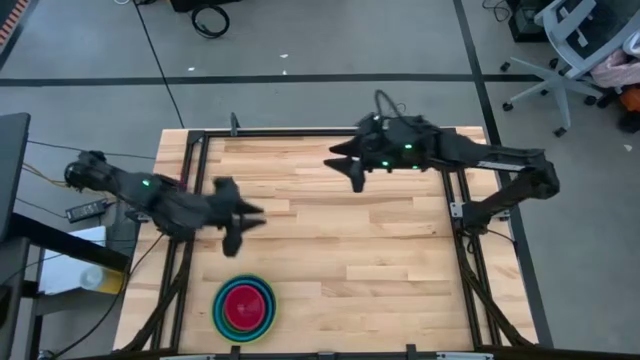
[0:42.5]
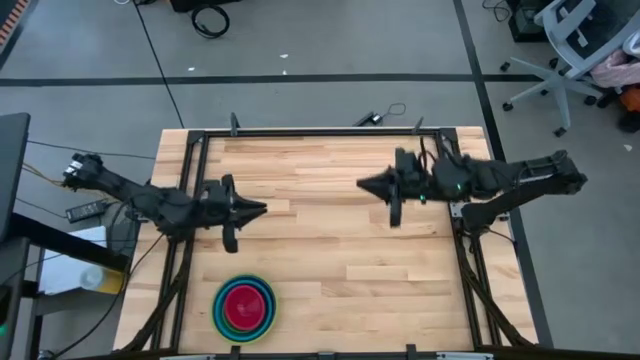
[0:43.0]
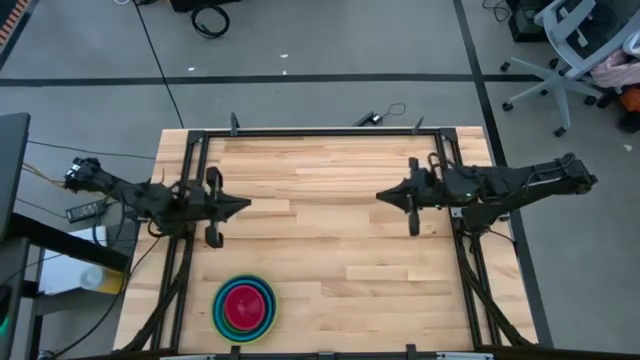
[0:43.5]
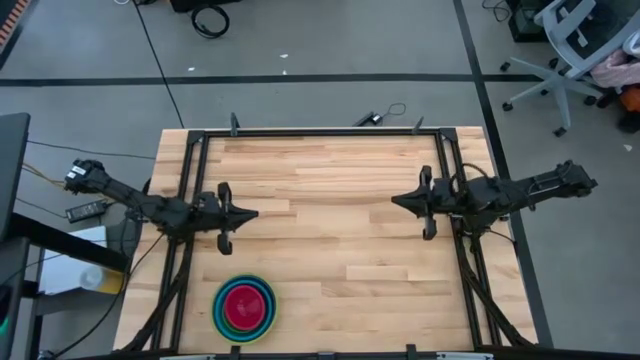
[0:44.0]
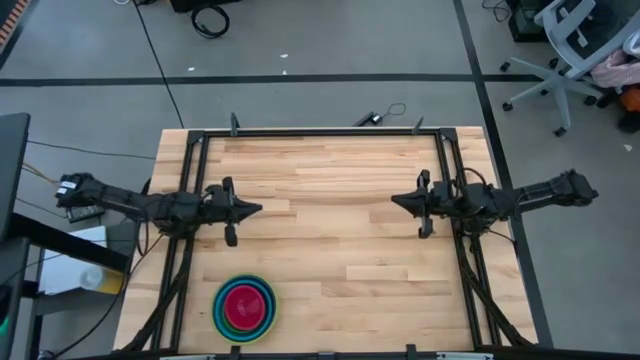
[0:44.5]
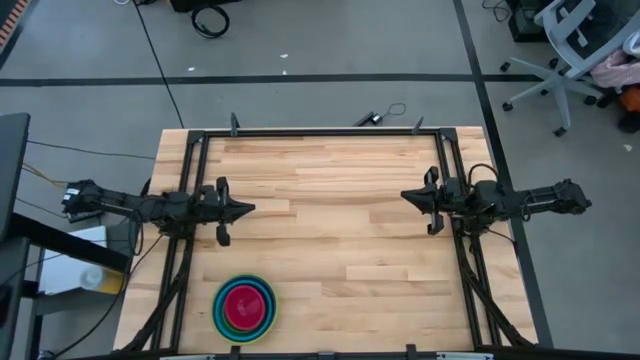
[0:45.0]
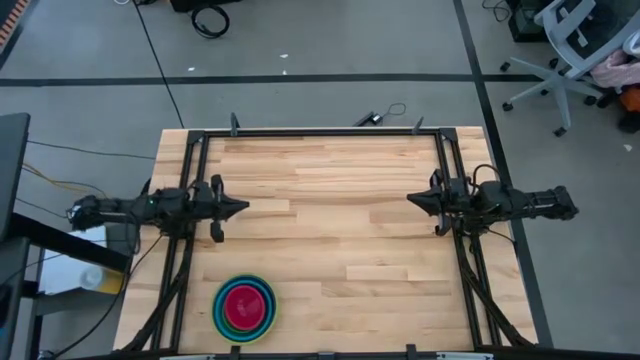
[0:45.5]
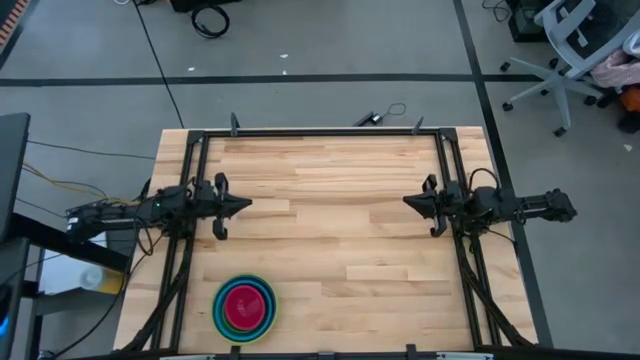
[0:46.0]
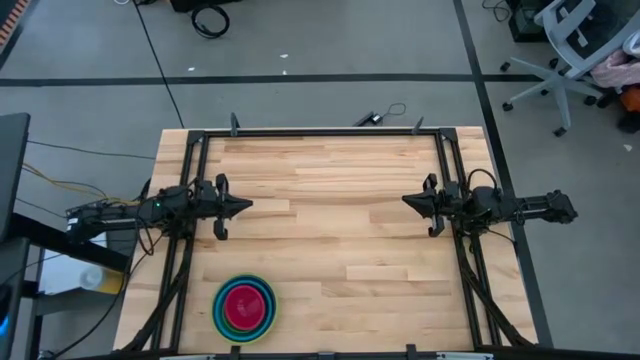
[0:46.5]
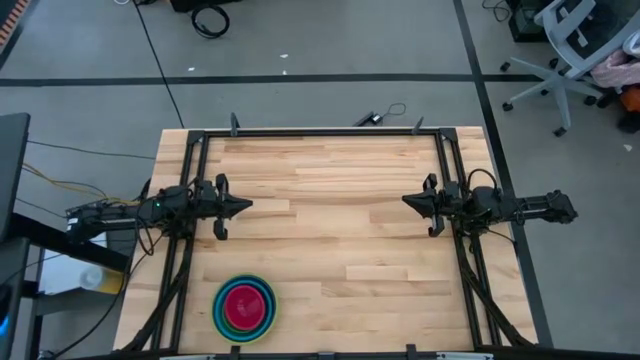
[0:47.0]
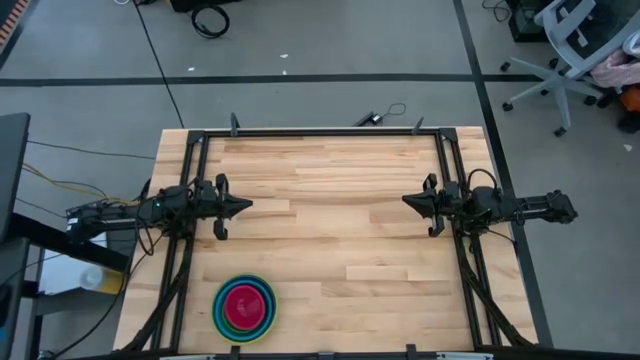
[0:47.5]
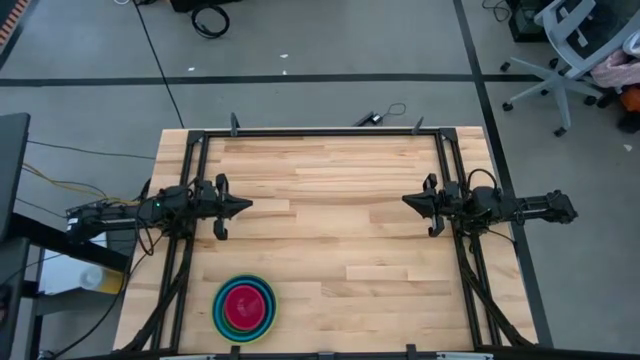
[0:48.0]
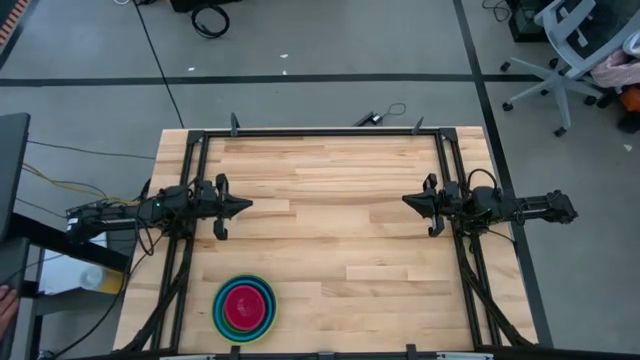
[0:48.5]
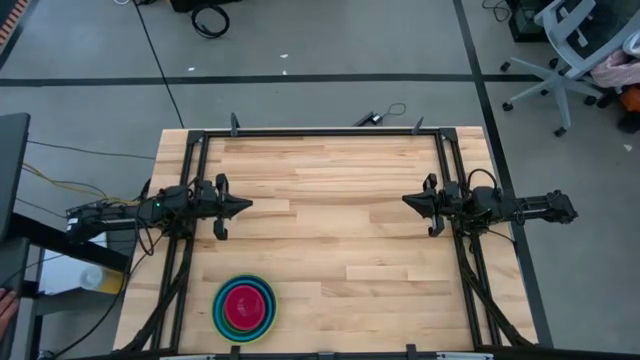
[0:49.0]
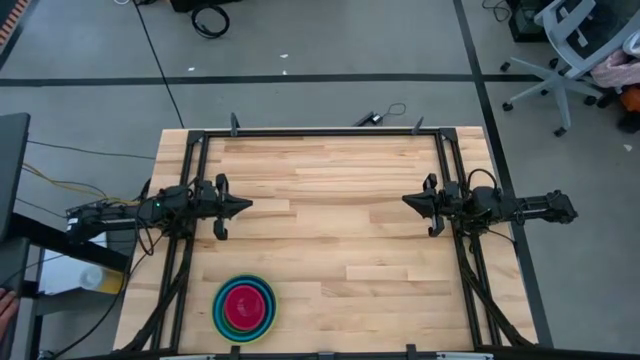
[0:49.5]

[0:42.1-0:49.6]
Return to Home Position

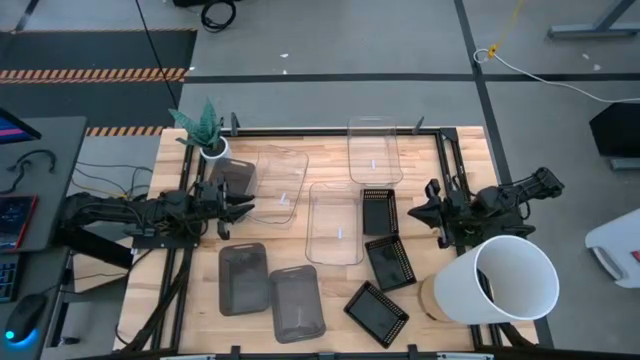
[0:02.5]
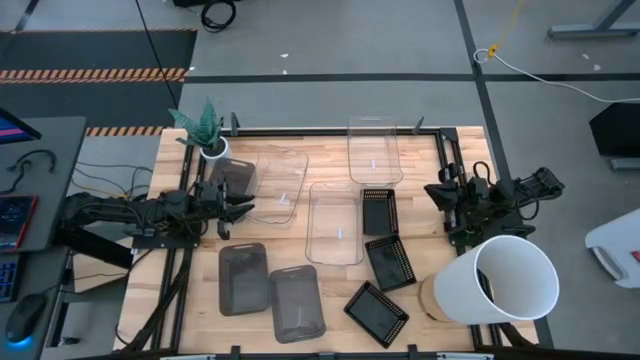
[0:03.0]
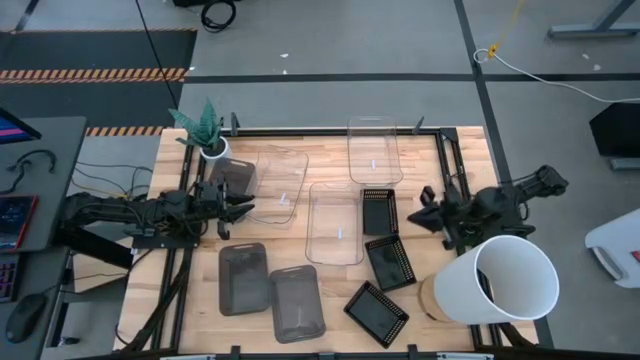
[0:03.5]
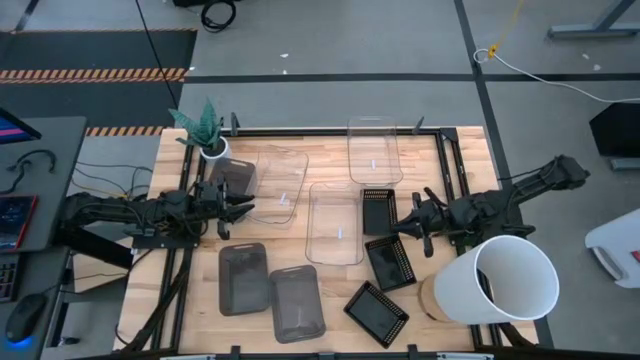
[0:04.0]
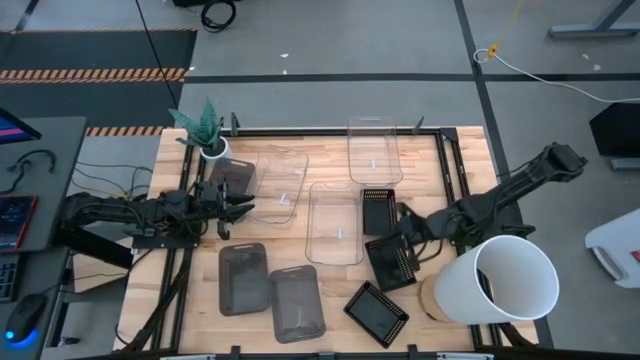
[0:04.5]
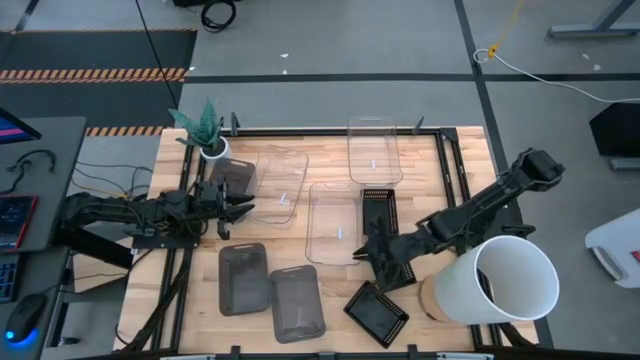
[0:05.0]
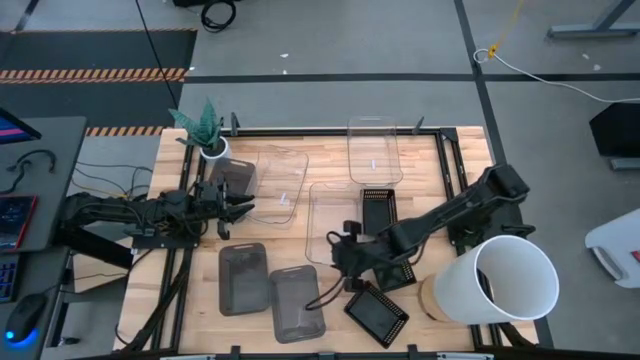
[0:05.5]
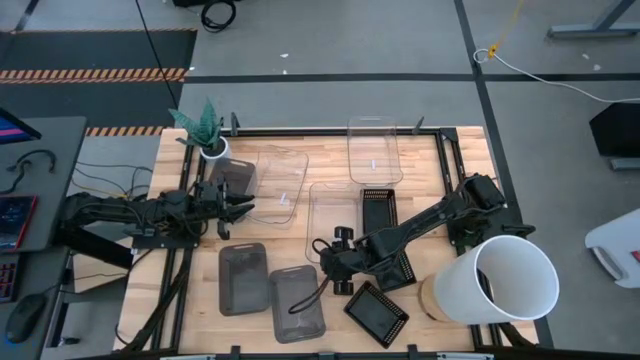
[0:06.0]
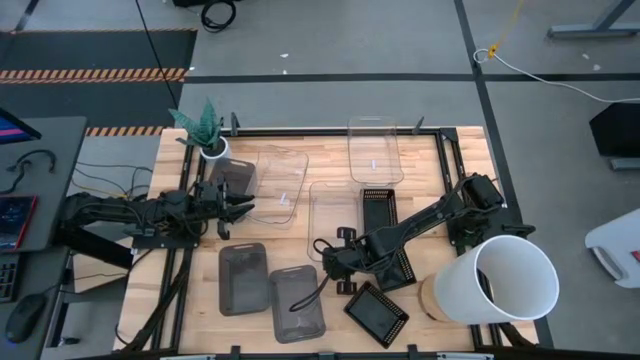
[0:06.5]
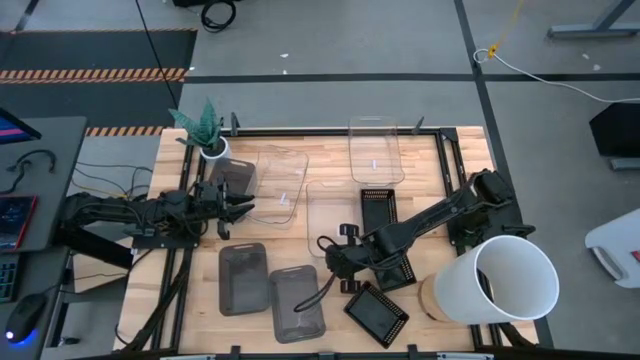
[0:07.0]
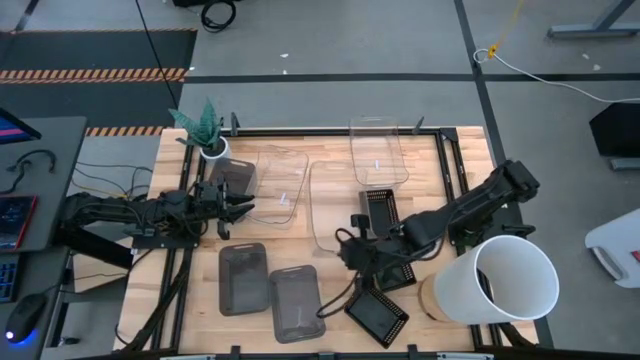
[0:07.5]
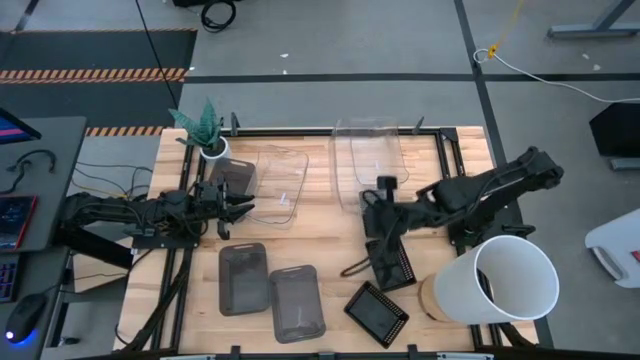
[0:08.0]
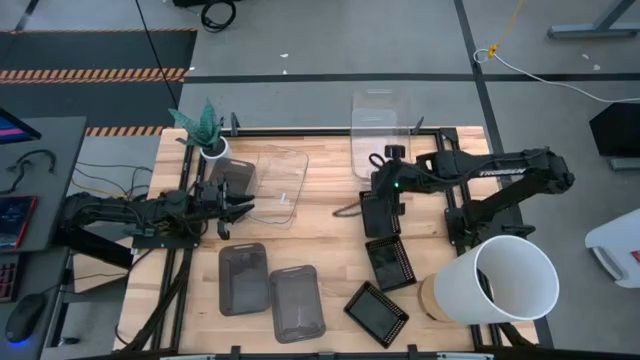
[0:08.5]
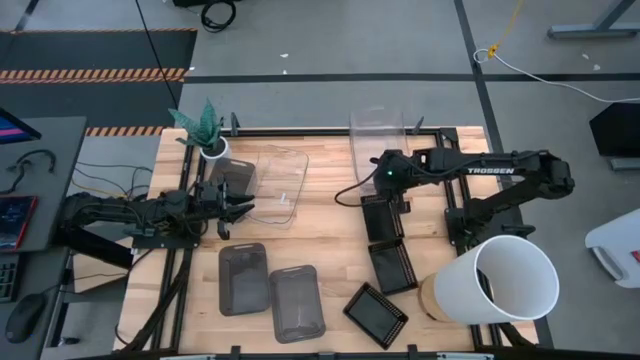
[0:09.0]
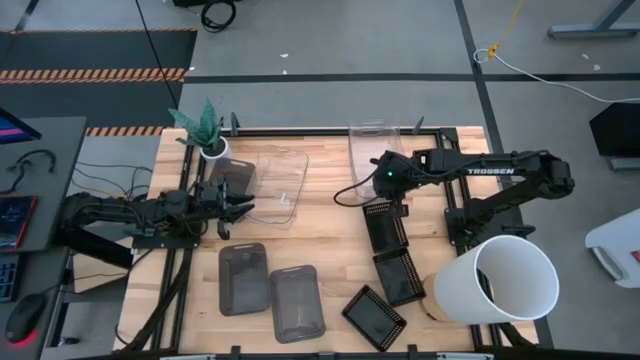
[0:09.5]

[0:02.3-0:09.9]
Stack the middle transparent bin on the right transparent bin

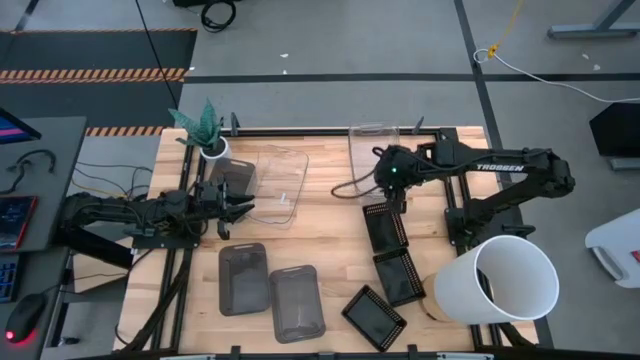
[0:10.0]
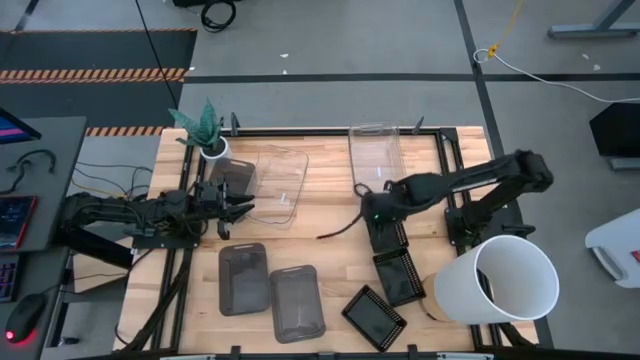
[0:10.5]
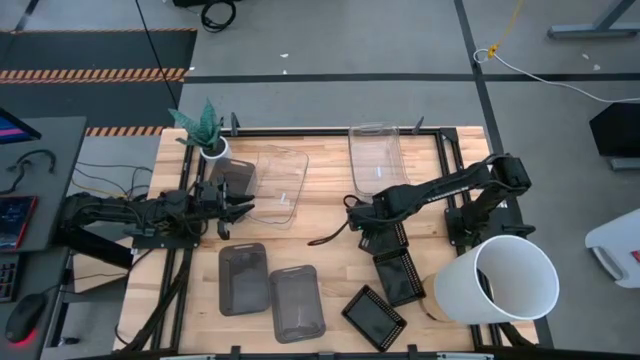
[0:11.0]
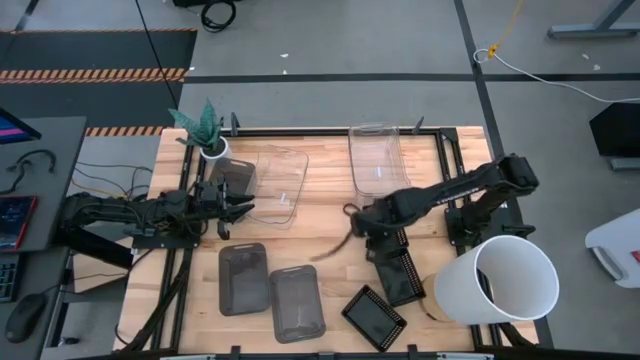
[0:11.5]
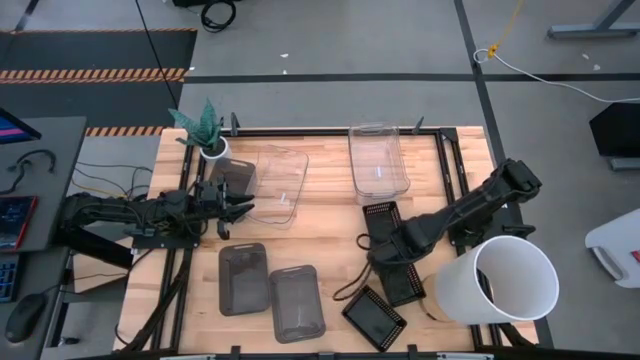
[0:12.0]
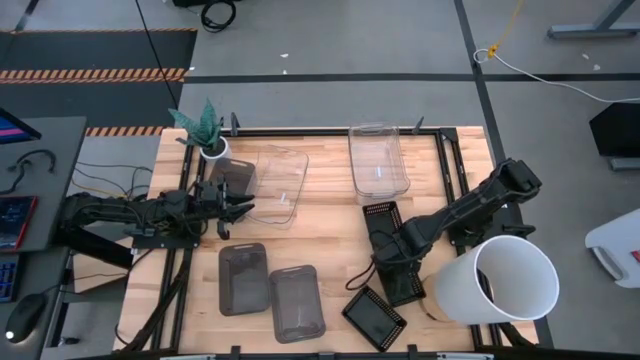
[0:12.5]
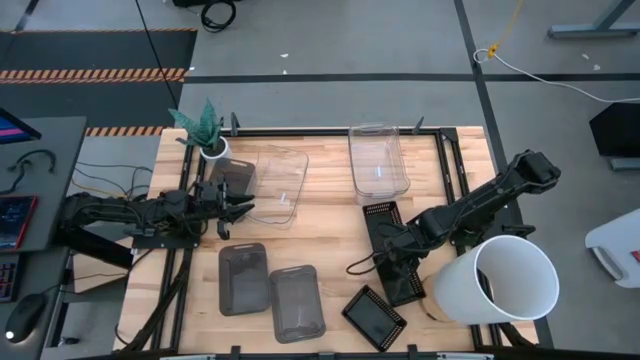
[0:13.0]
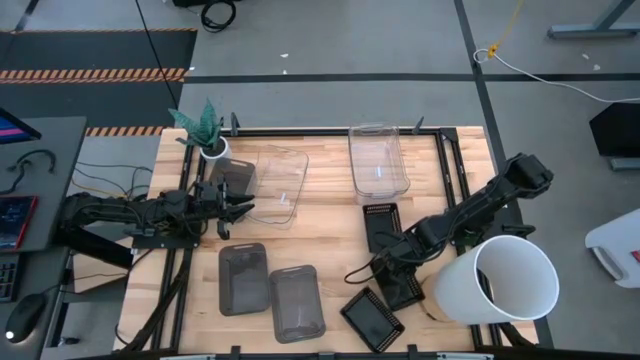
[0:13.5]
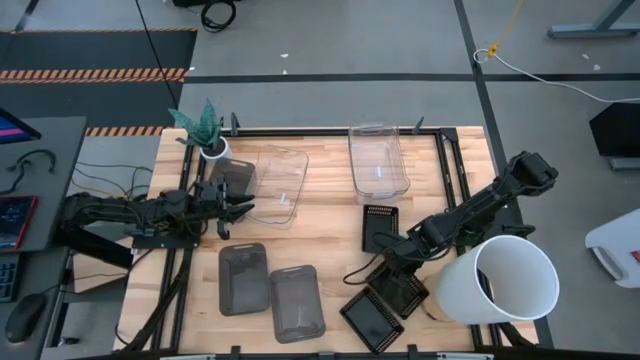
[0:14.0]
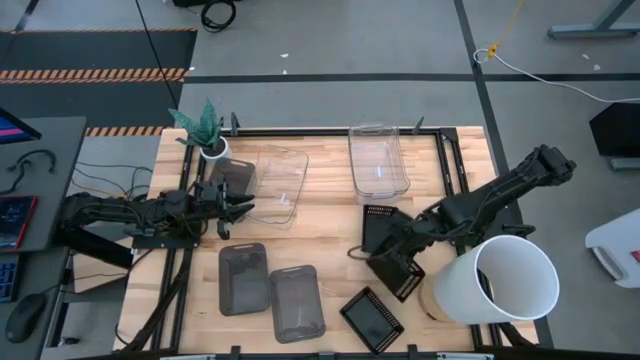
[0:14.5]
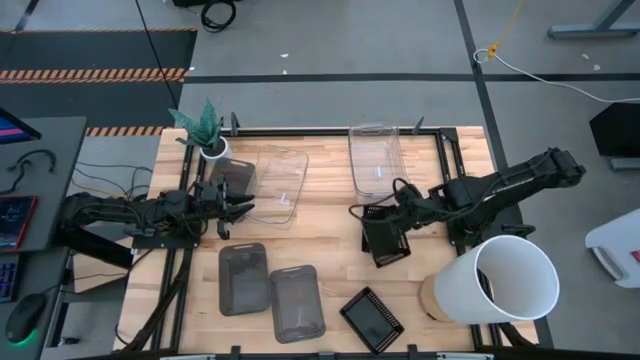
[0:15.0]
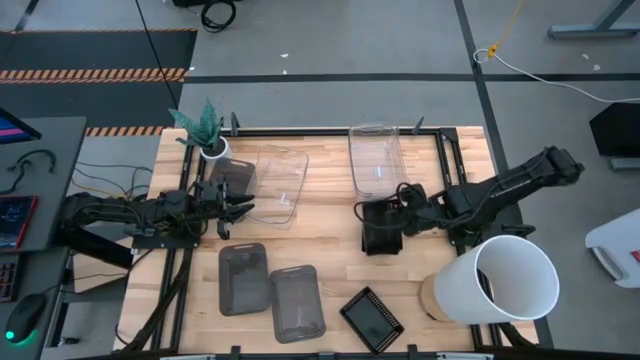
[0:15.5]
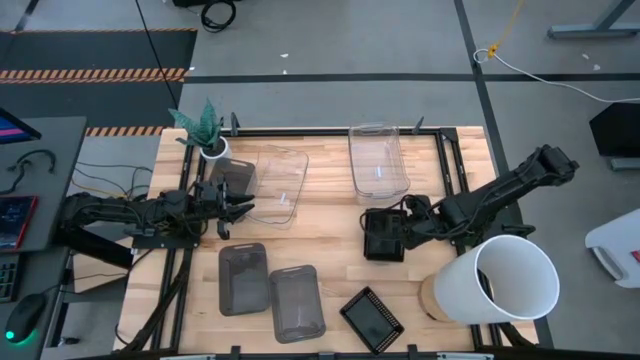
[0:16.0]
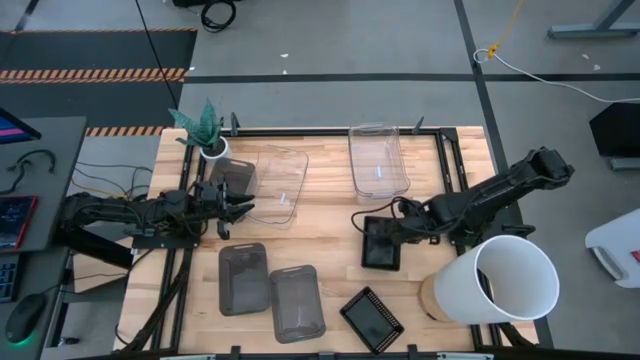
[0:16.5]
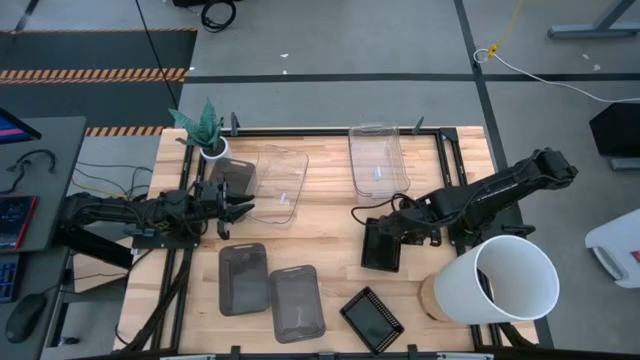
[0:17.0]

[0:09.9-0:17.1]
Stack the middle black bin on the top black bin
